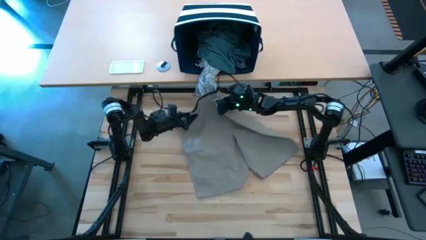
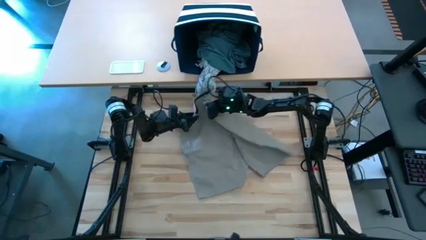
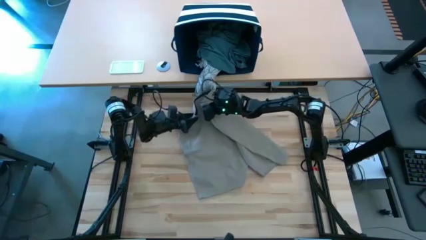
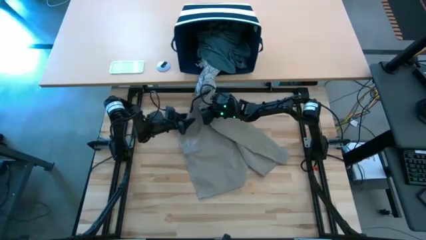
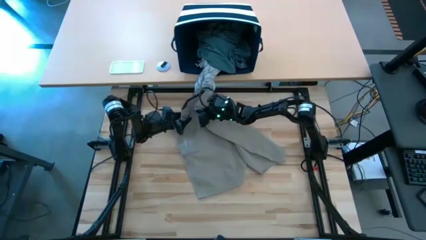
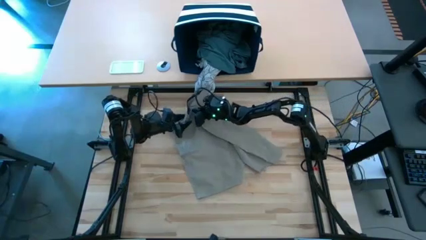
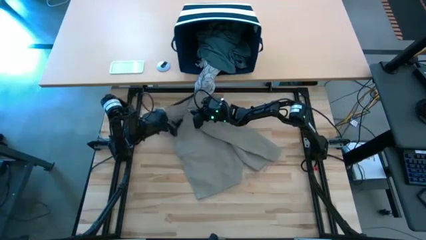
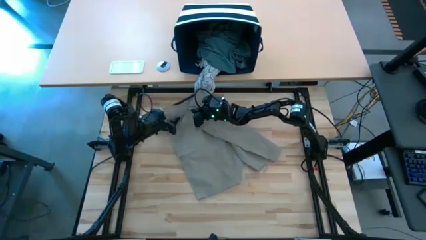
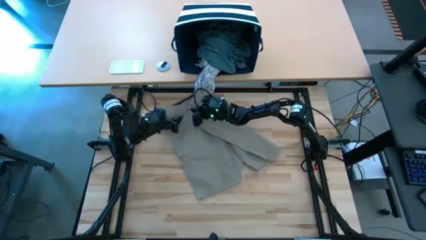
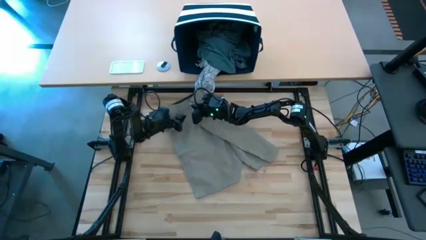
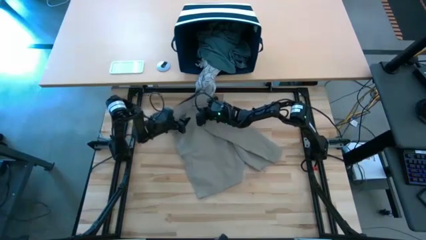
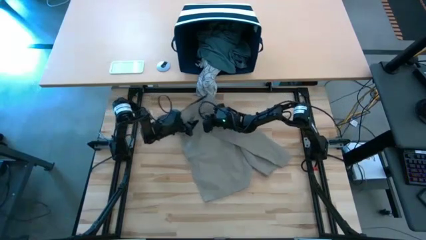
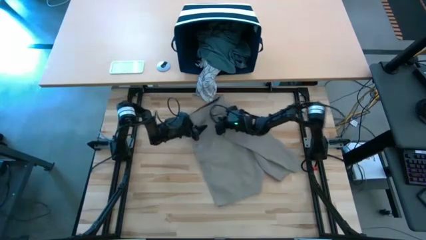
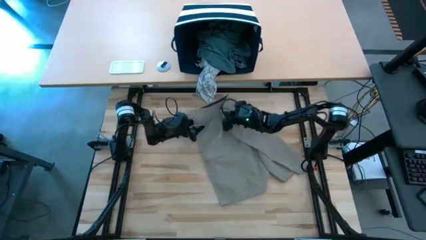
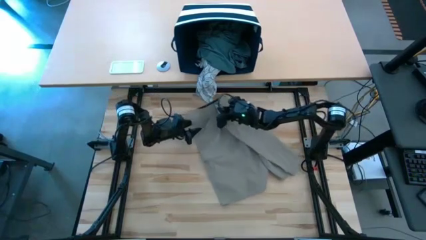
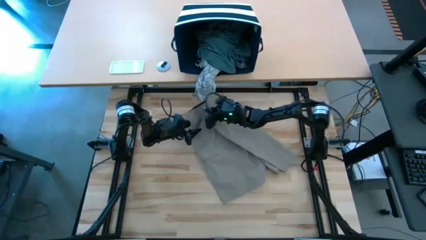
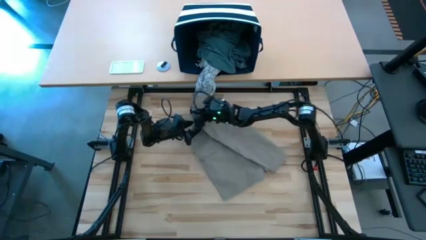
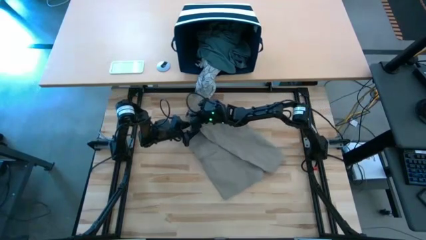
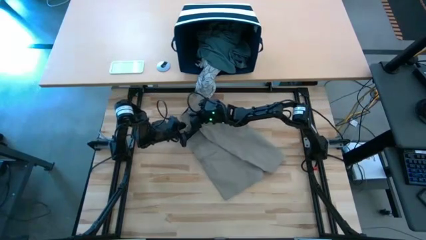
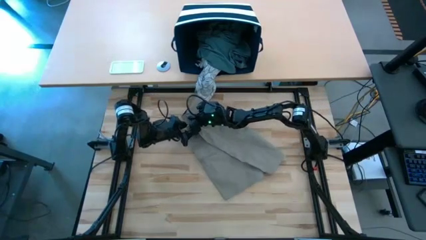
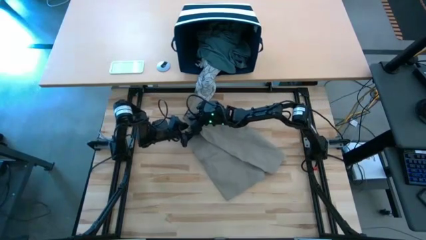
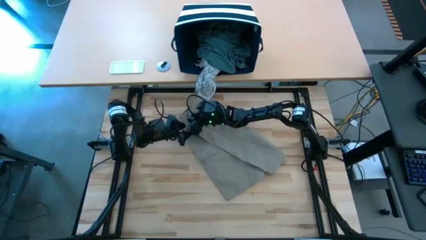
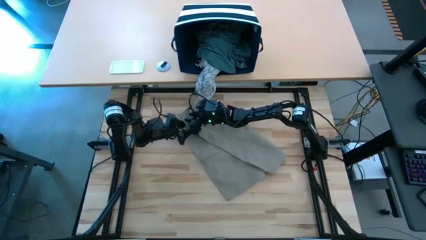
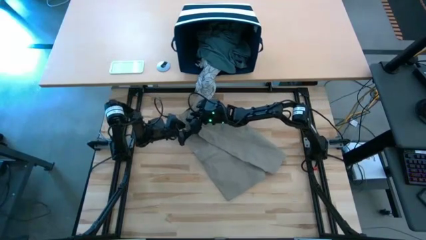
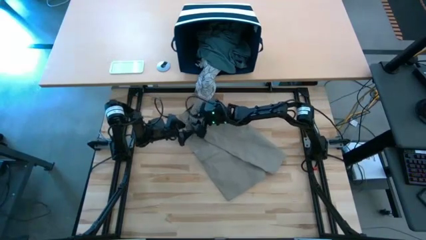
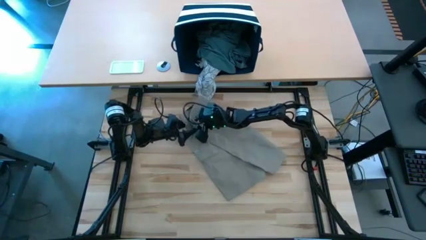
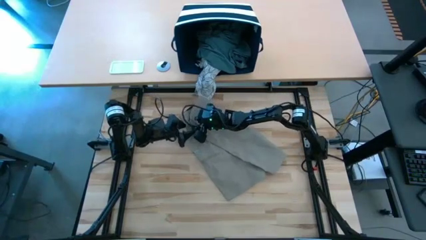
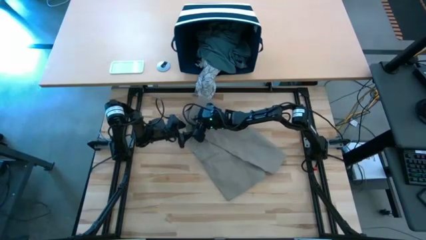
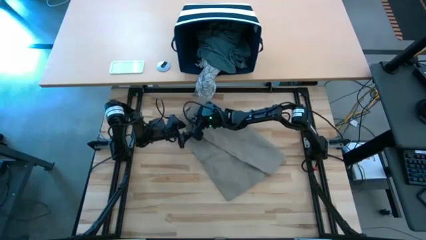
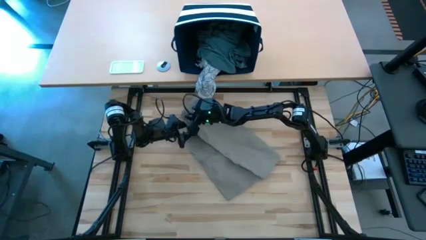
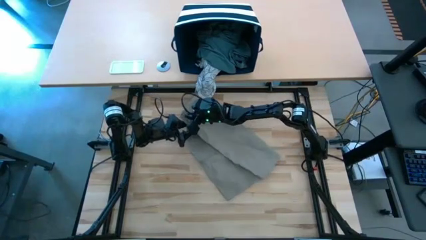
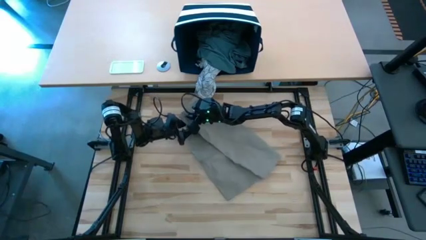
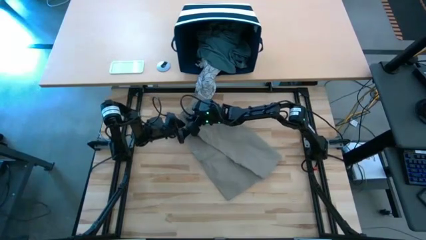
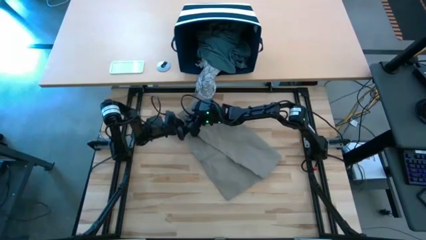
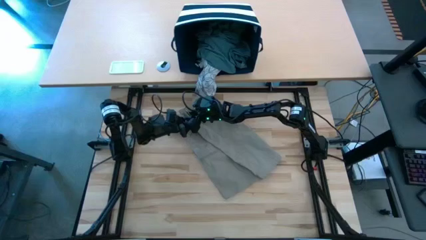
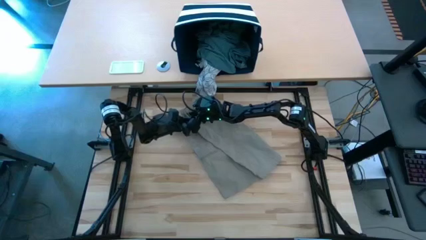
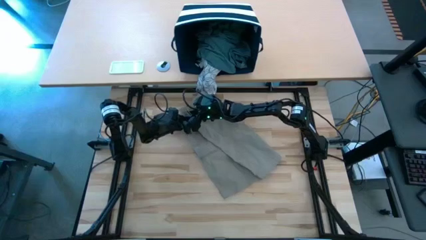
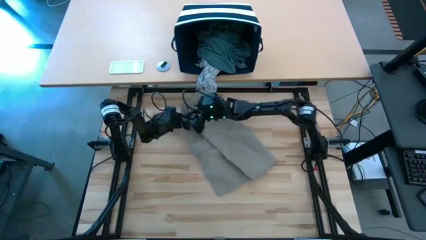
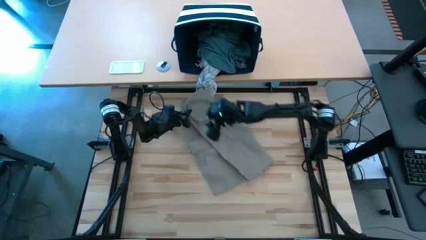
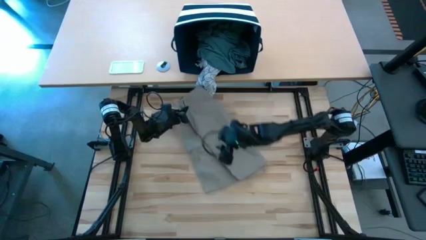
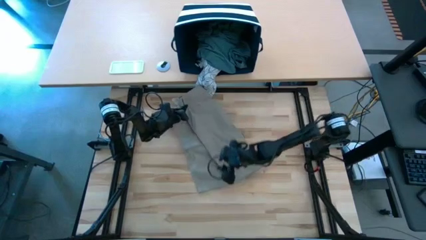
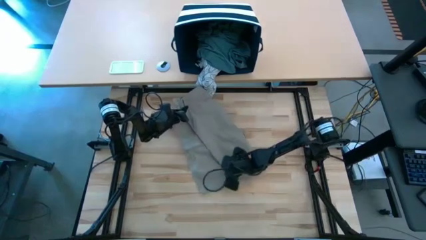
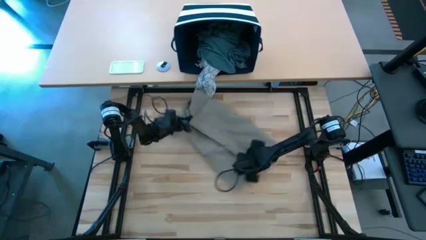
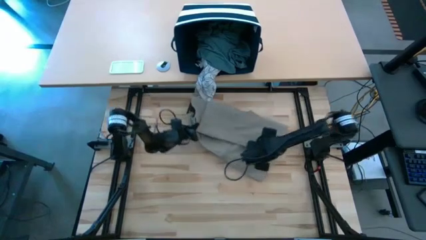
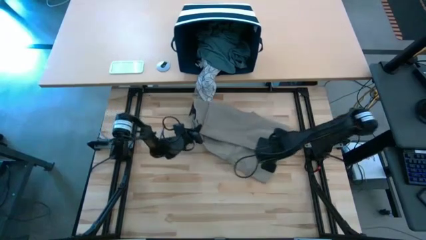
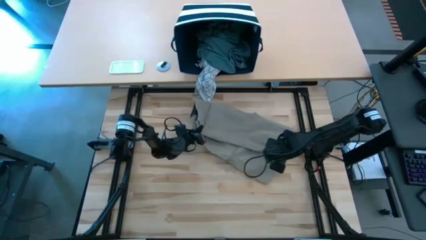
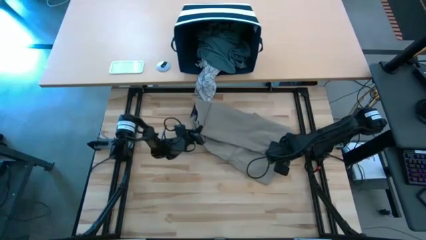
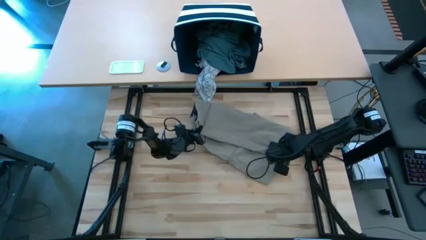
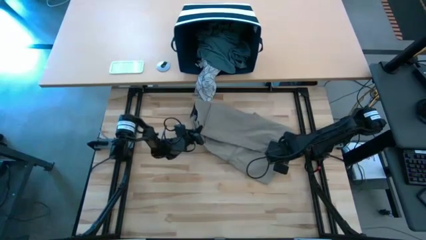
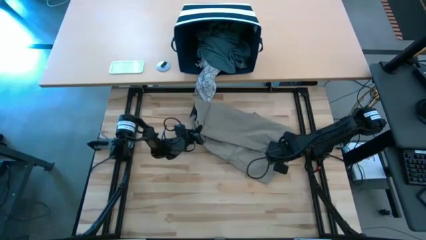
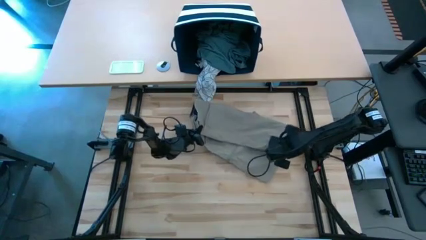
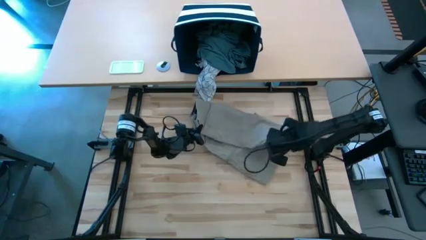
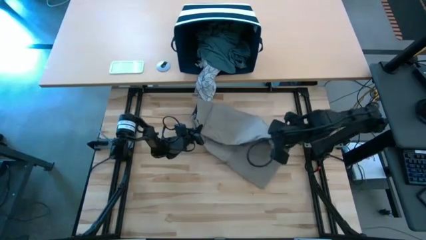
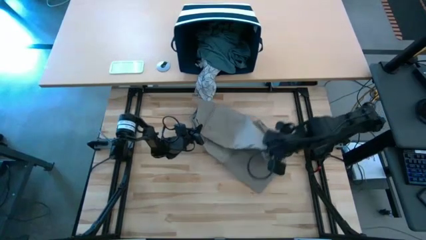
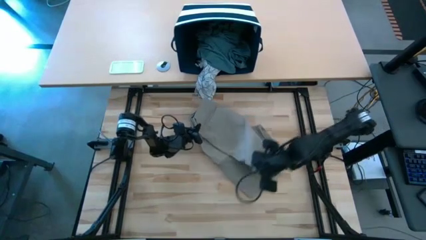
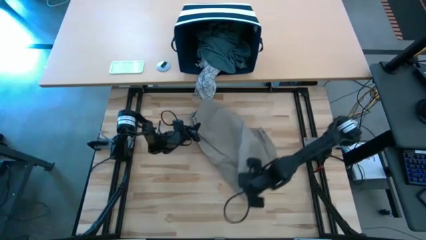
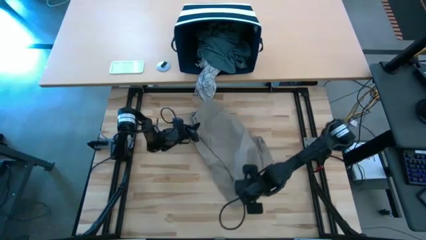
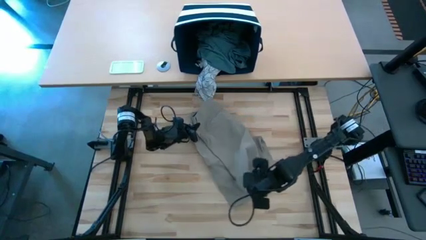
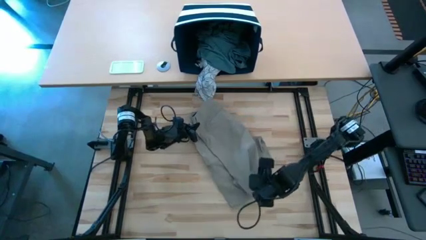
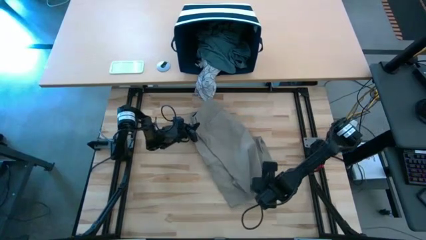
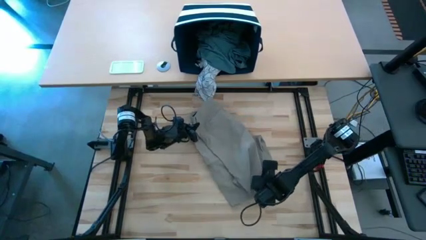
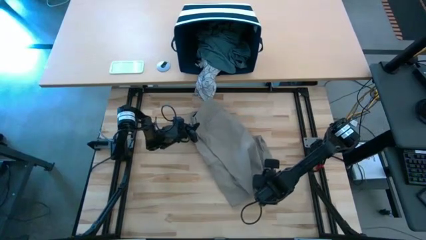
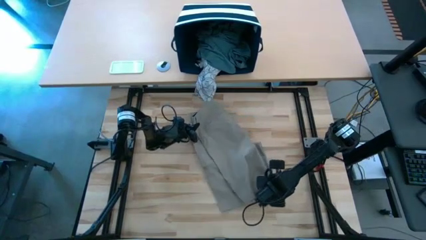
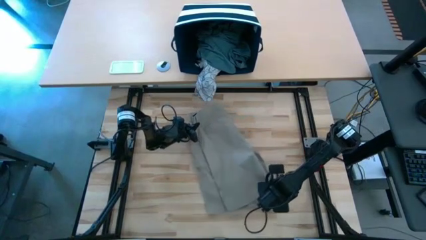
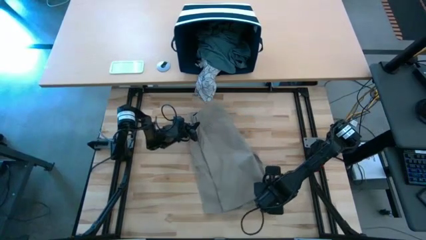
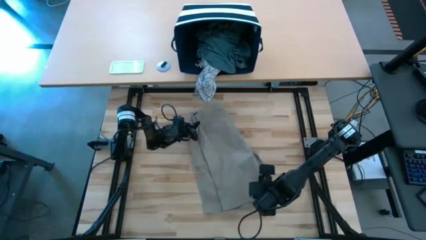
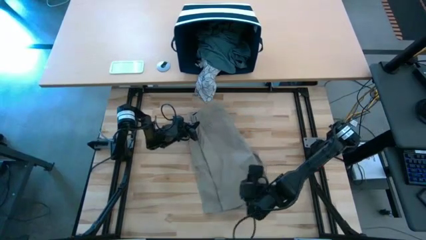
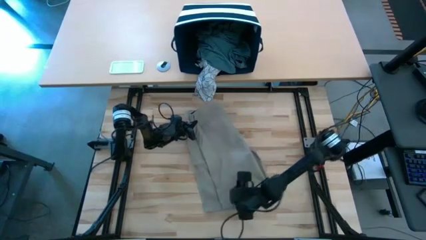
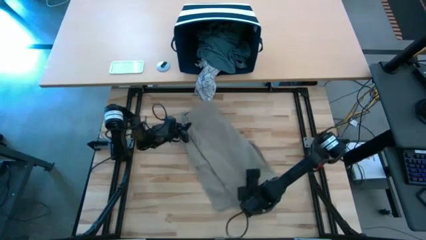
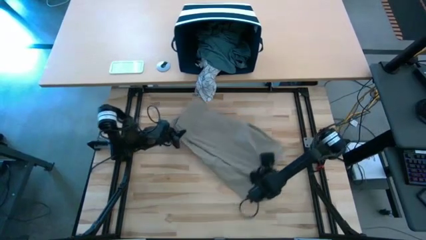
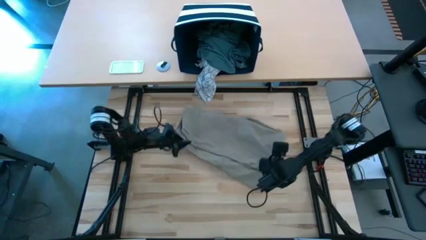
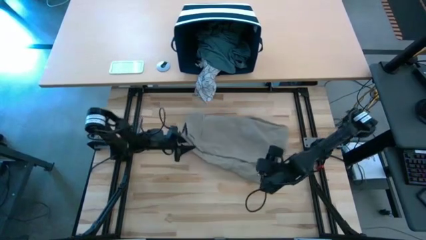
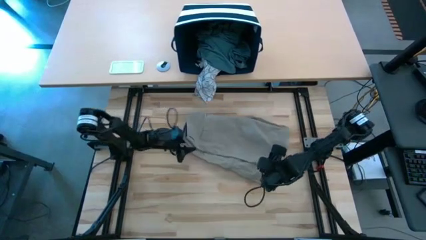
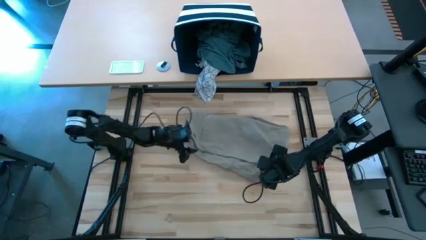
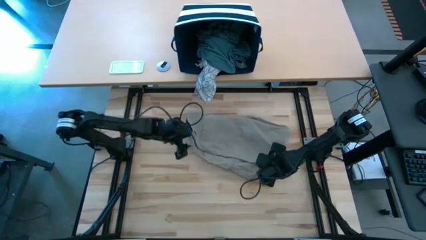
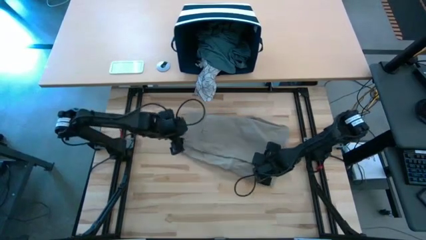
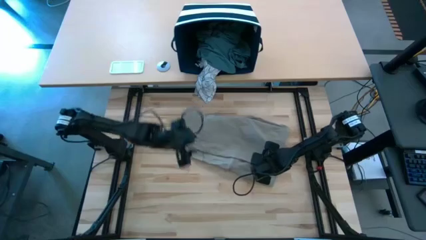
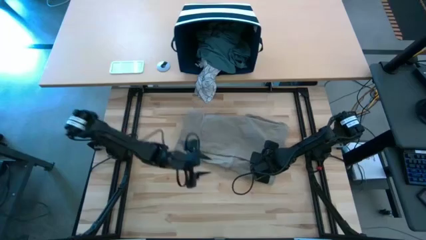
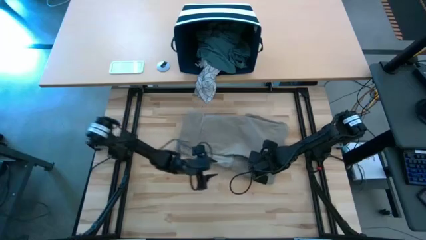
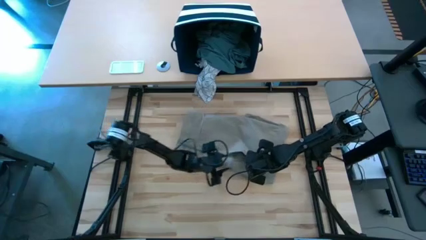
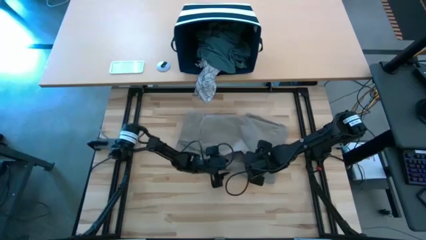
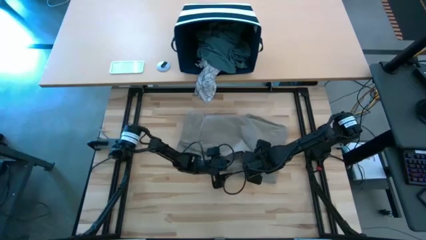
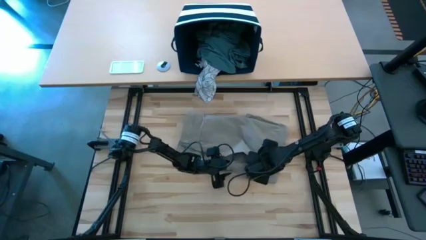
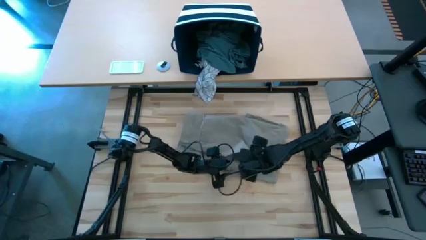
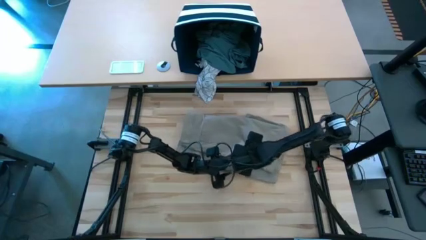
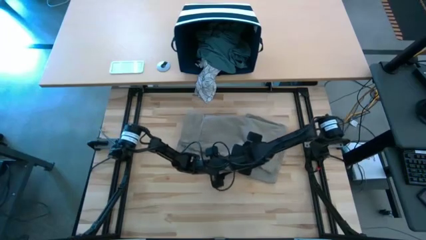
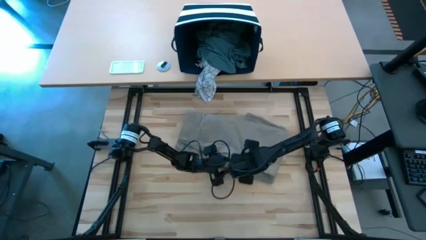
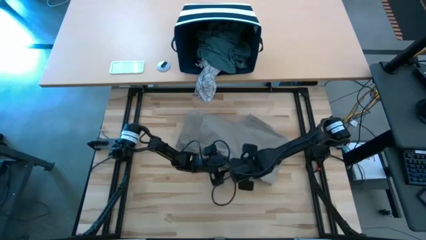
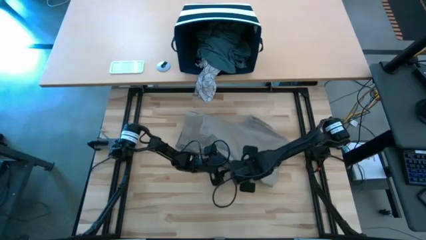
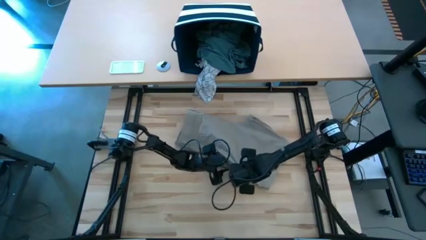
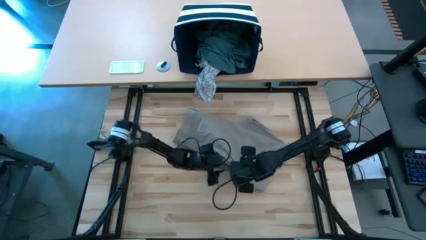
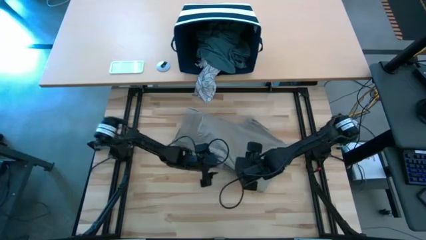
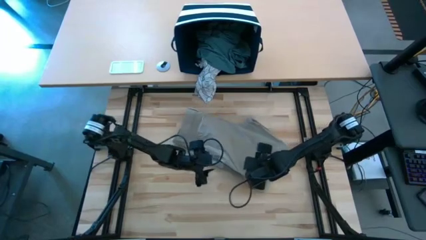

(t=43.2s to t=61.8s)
Task: Fold Laundry from Bin
Fold the brown shorts from the blue laundry basket
